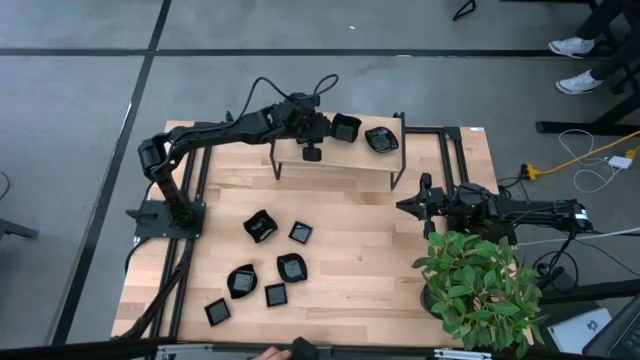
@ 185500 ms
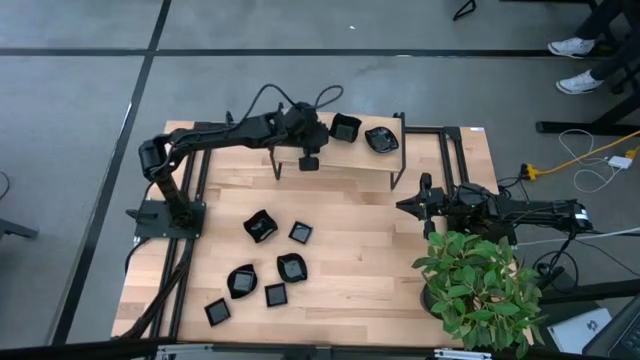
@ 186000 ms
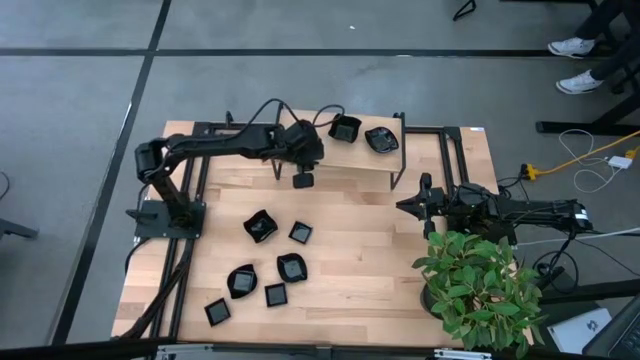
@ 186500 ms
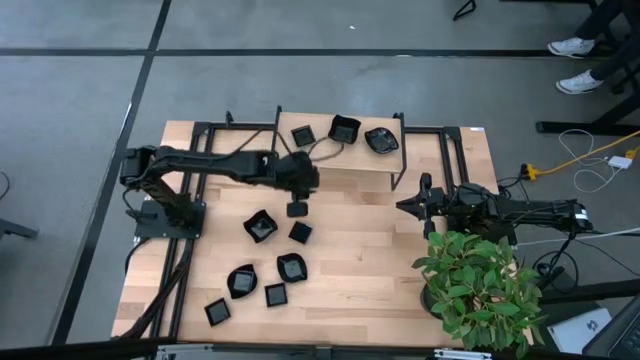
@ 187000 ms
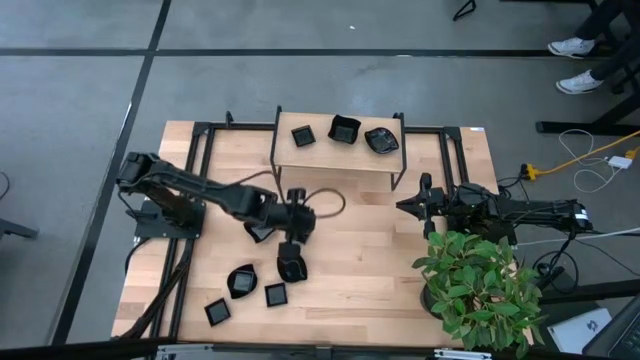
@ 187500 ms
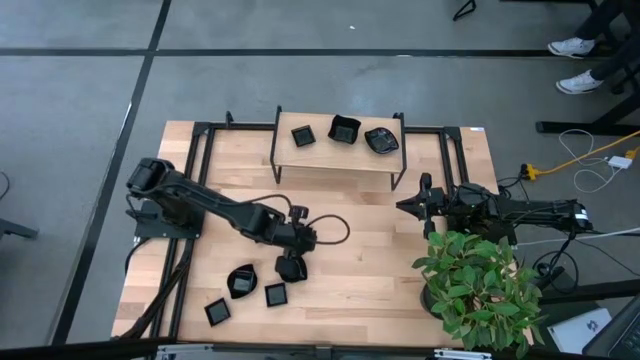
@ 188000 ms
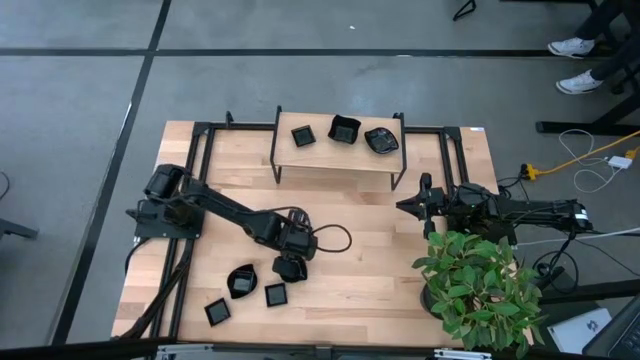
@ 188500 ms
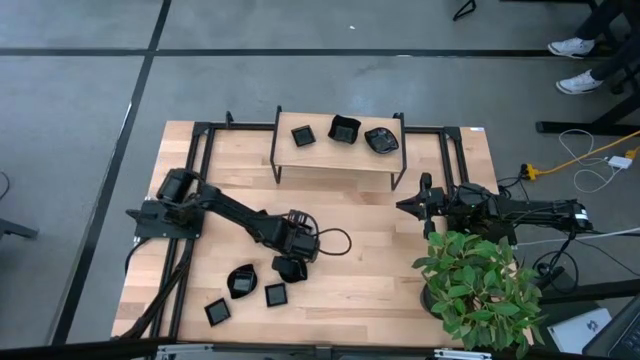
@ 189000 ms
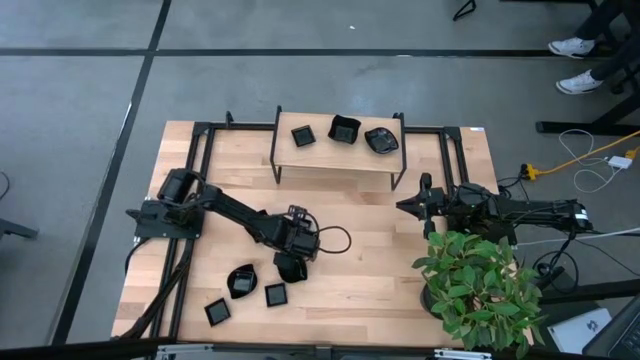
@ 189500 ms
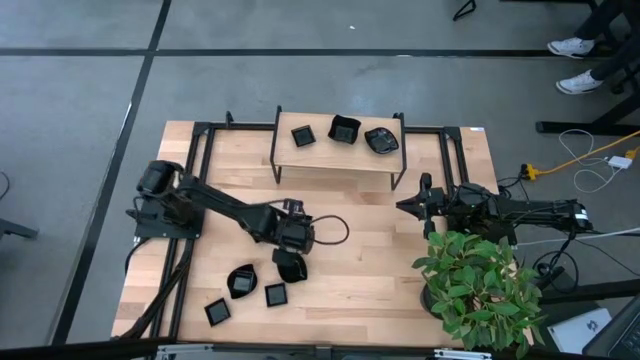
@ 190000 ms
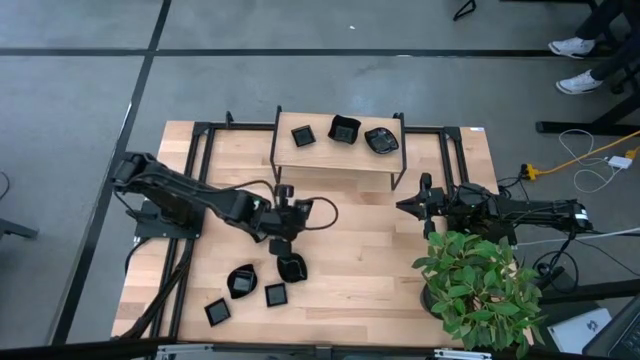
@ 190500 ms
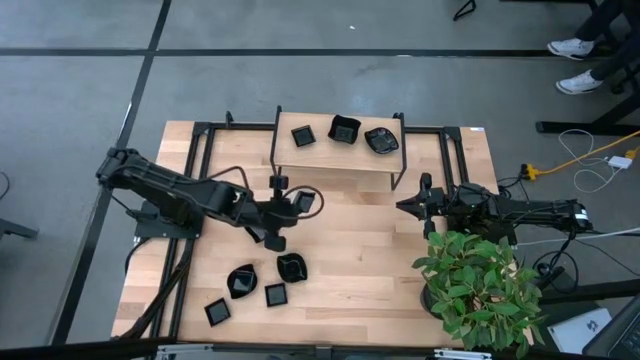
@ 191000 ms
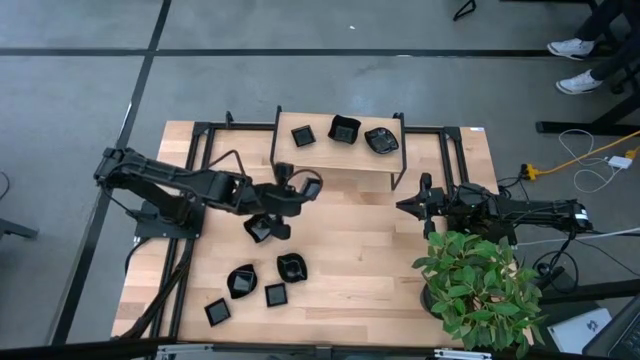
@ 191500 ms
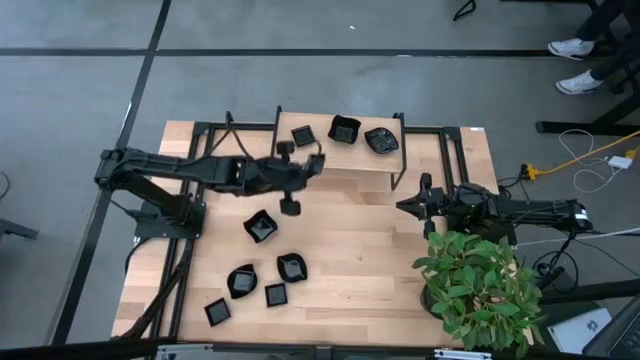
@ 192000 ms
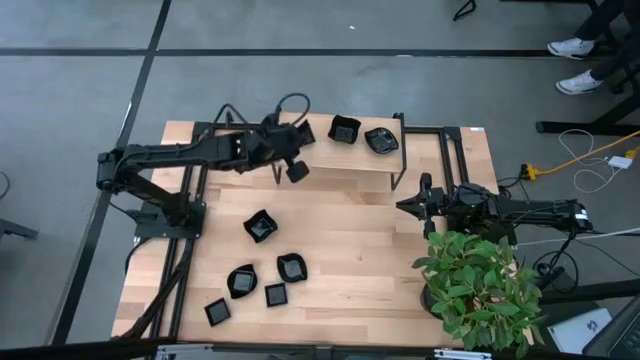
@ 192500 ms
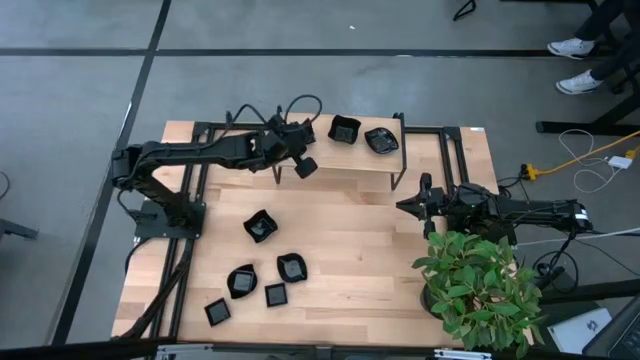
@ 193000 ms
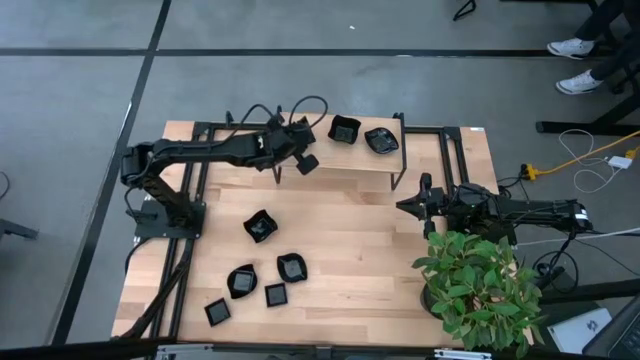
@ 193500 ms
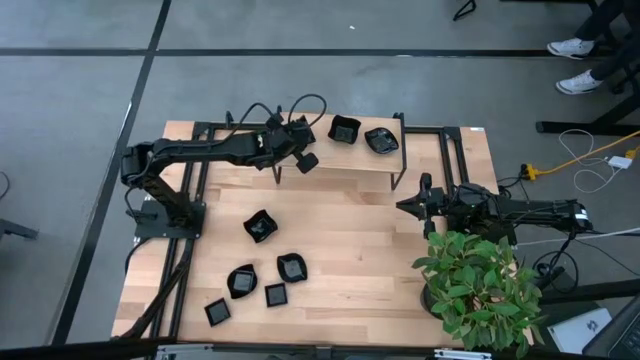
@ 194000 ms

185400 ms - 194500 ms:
Task: Pick & Place Mini shaped plates
Stack the square plate on top of the square plate on the shelf

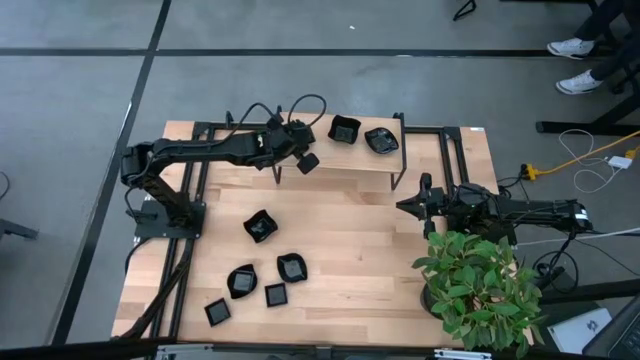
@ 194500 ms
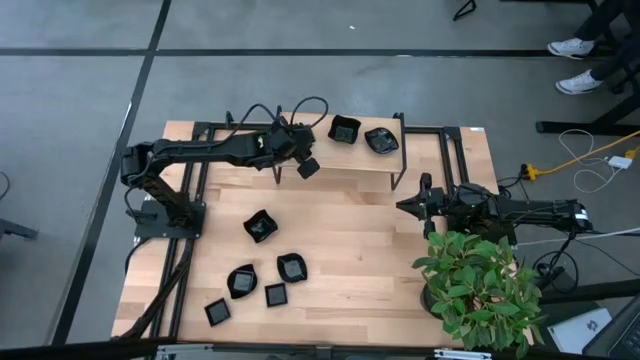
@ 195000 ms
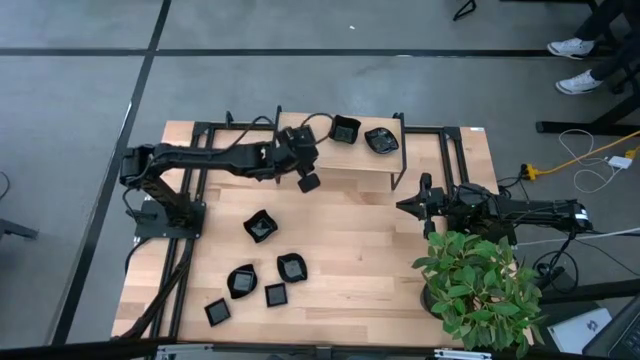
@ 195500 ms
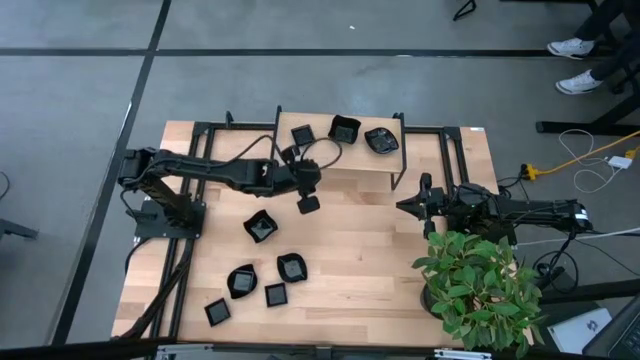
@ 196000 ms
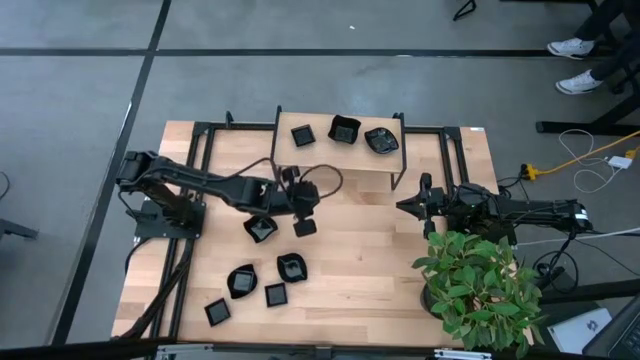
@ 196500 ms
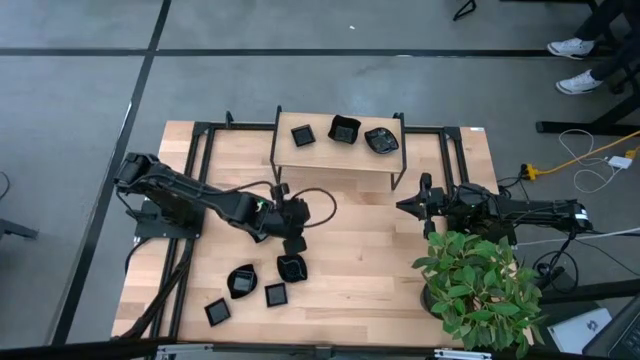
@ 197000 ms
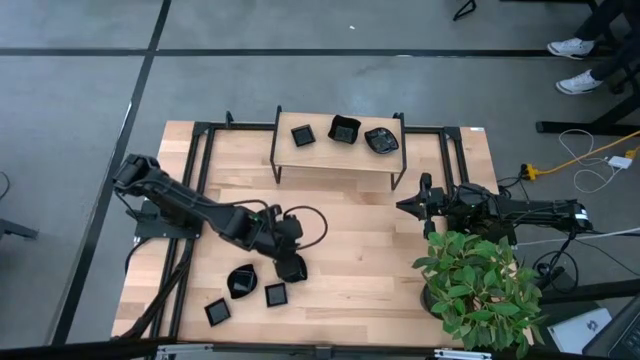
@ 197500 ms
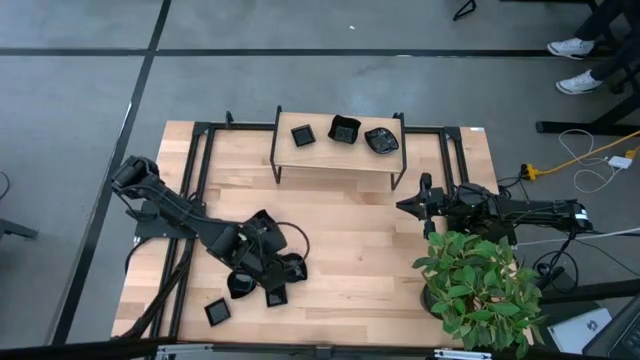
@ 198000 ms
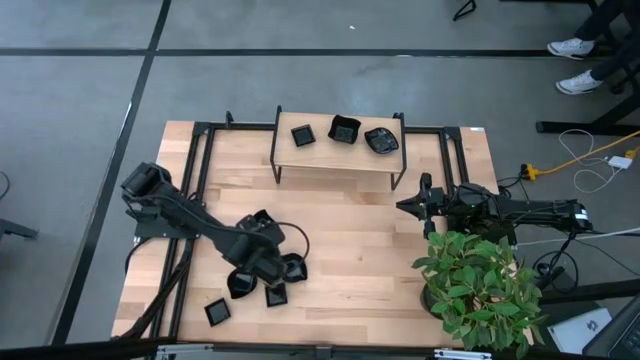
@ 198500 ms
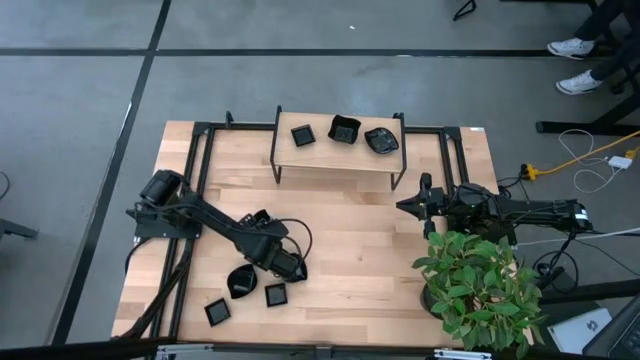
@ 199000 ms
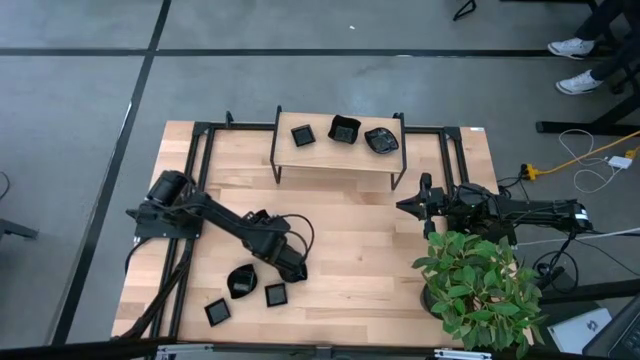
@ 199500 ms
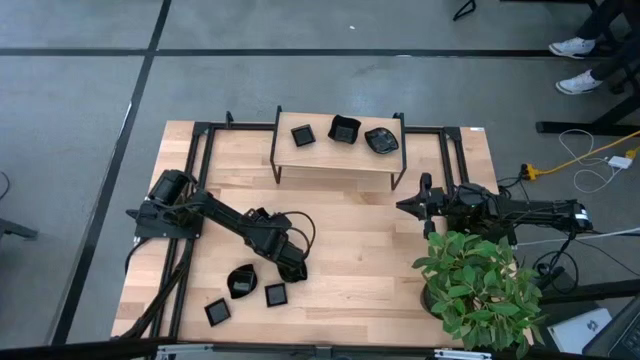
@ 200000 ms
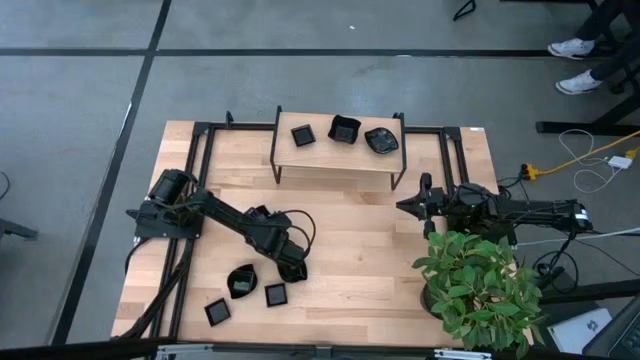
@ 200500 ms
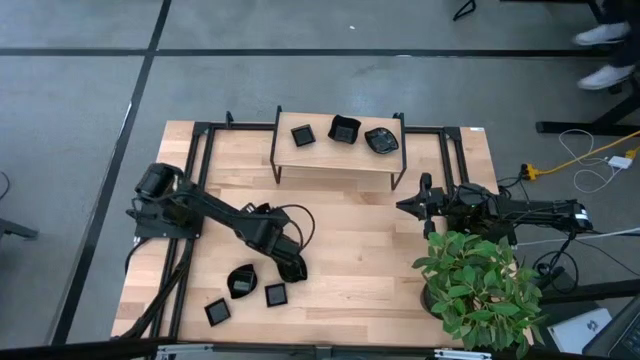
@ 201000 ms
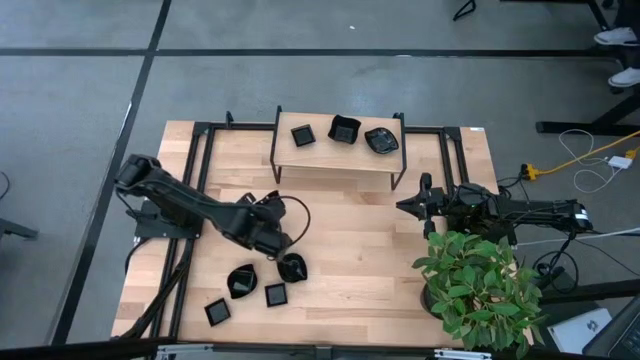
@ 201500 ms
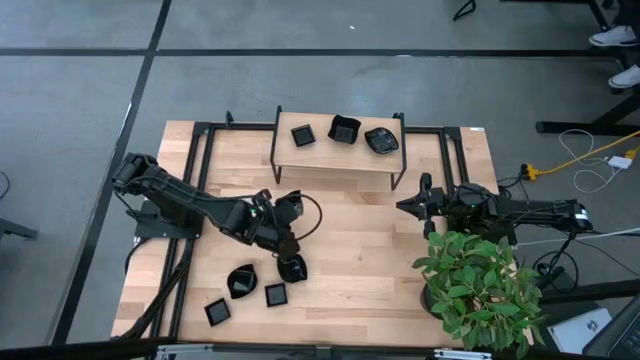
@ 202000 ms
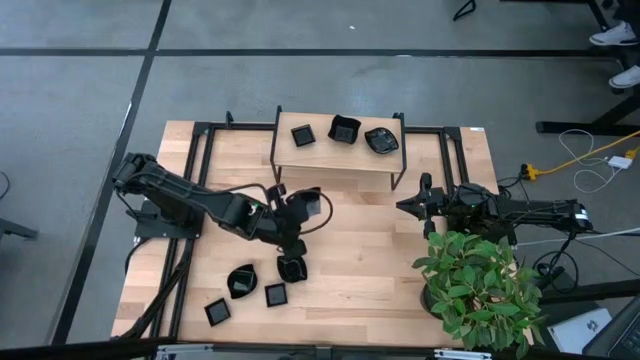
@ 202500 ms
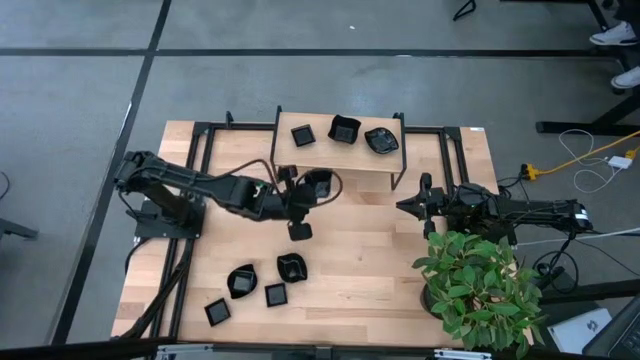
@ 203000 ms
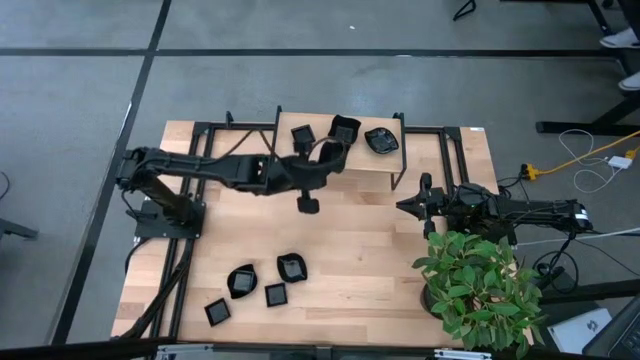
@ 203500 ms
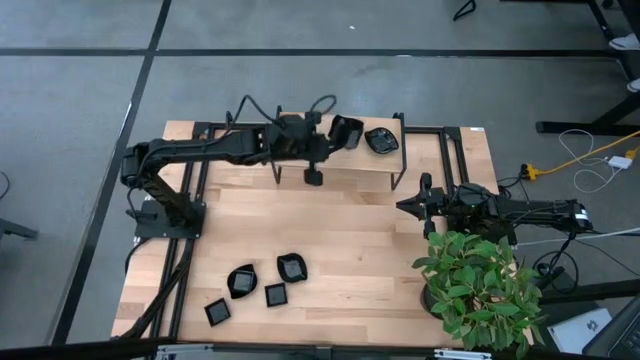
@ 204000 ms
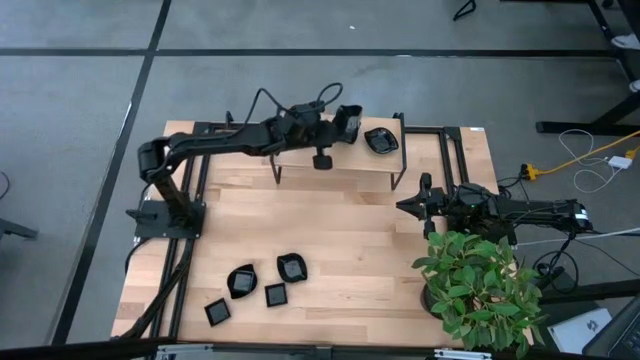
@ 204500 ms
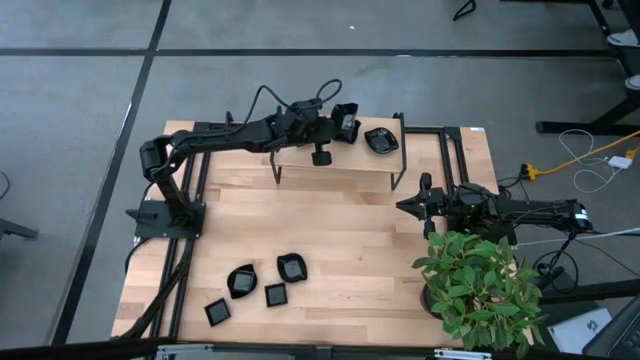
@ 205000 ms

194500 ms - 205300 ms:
Stack the distorted square plate on top of the distorted square plate on the shelf

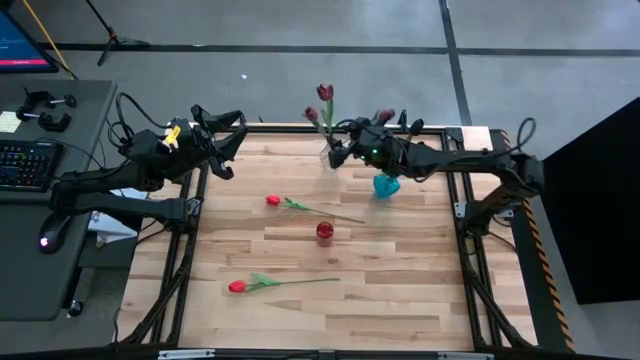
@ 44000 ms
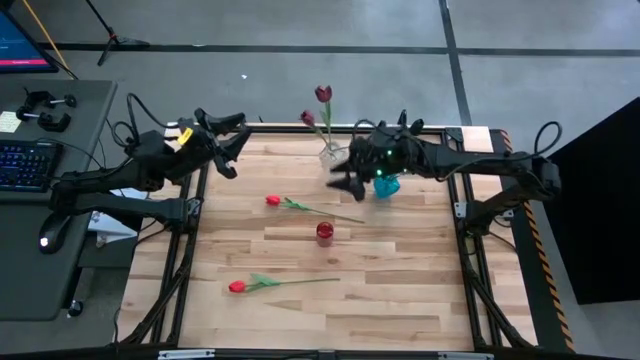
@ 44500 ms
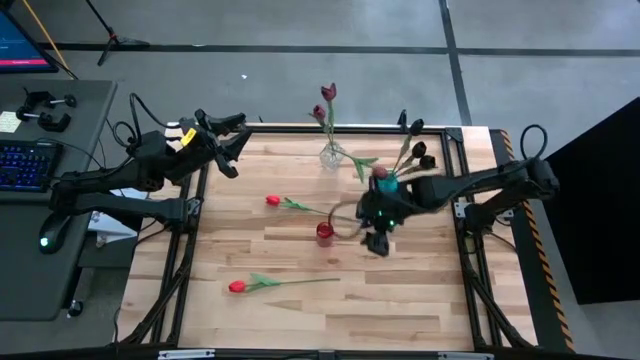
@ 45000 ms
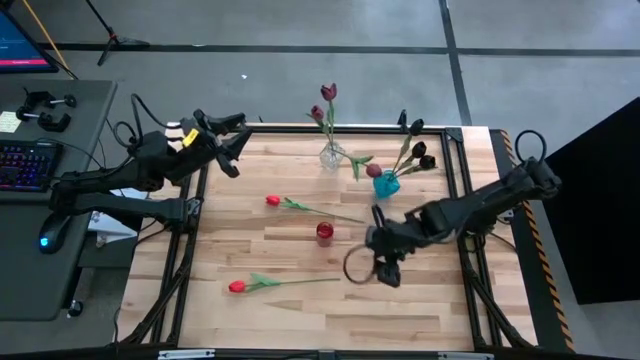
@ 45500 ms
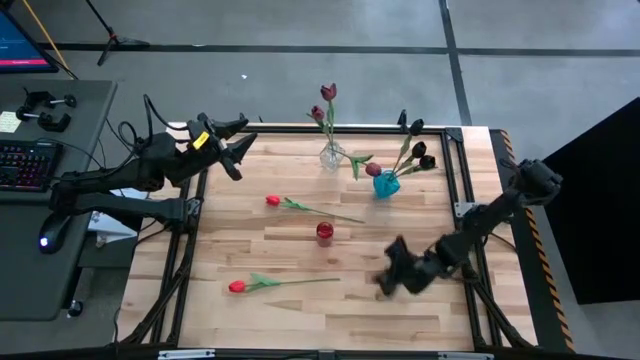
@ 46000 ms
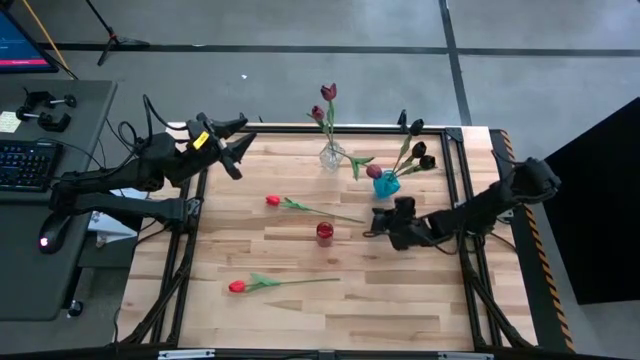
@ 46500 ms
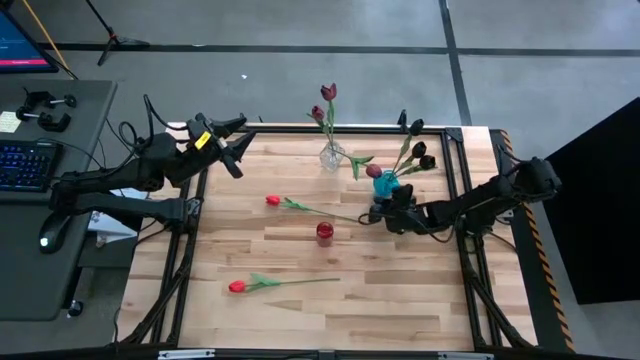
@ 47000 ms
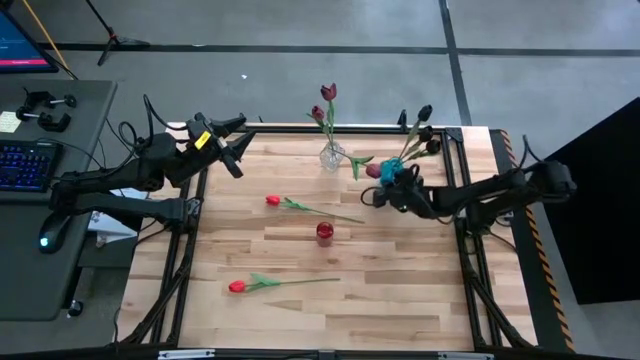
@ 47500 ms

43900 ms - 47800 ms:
Task: Sort flowers into vase by color
Adjust the blue vase
